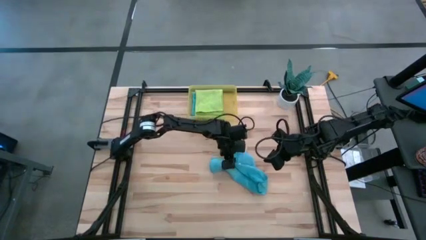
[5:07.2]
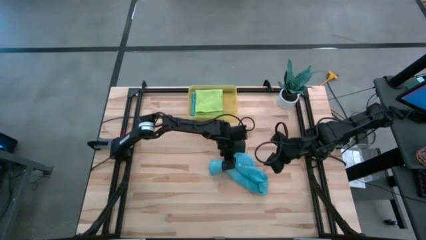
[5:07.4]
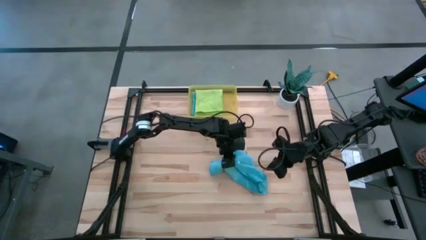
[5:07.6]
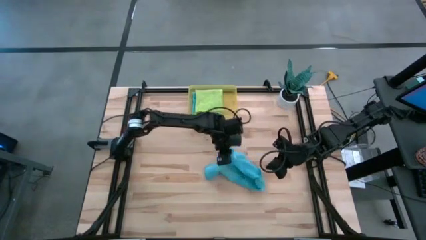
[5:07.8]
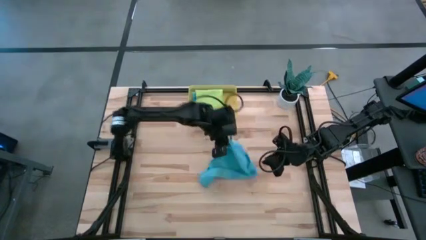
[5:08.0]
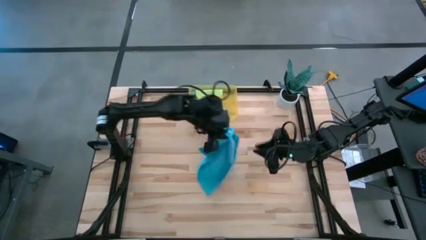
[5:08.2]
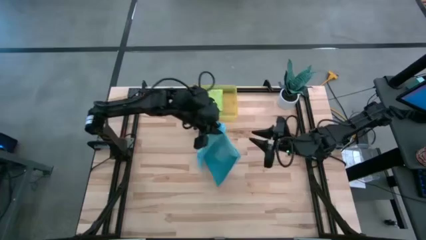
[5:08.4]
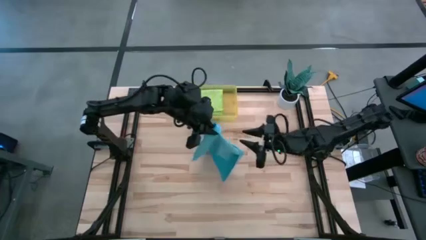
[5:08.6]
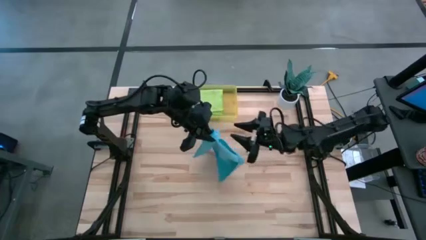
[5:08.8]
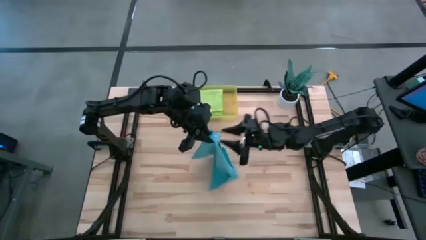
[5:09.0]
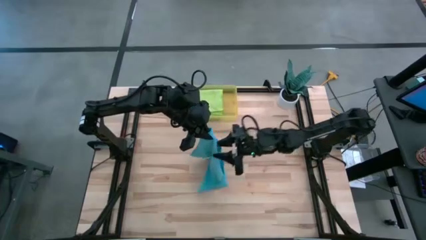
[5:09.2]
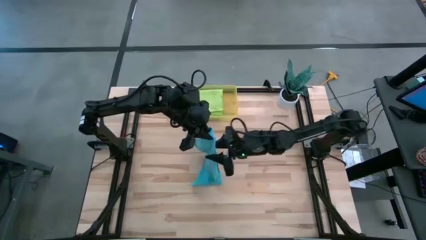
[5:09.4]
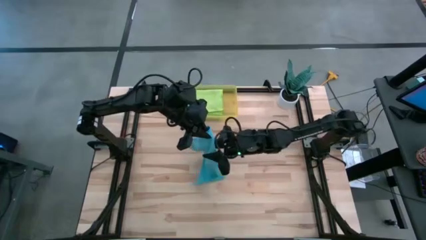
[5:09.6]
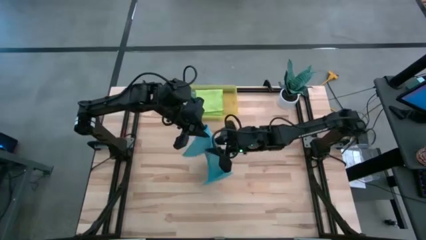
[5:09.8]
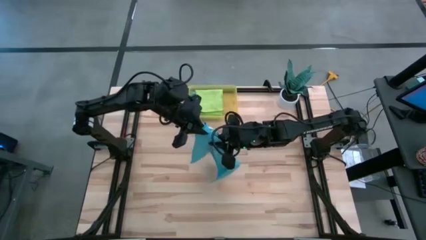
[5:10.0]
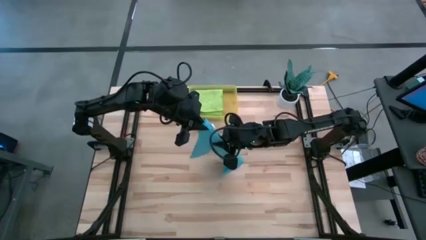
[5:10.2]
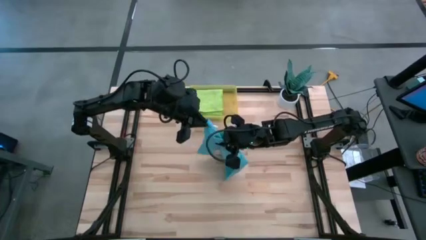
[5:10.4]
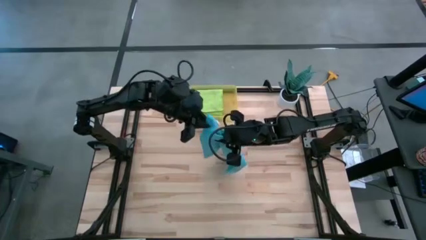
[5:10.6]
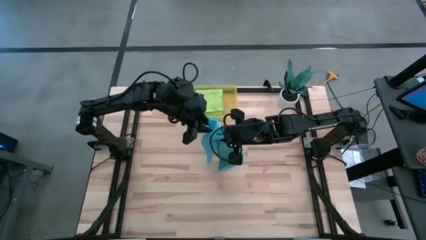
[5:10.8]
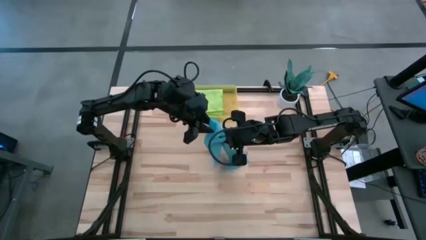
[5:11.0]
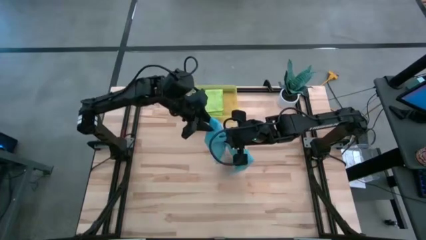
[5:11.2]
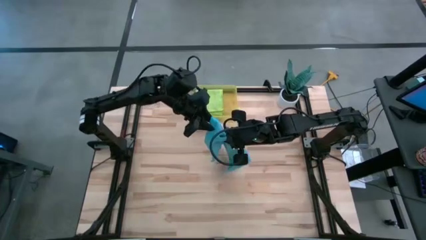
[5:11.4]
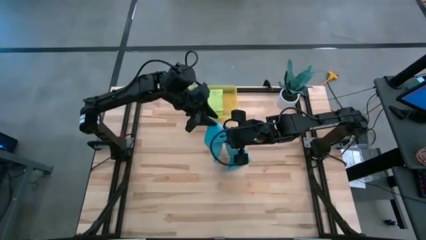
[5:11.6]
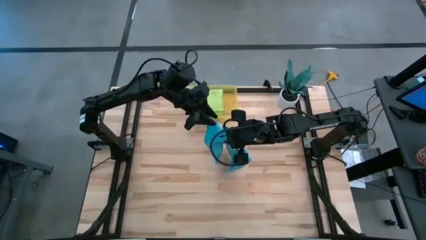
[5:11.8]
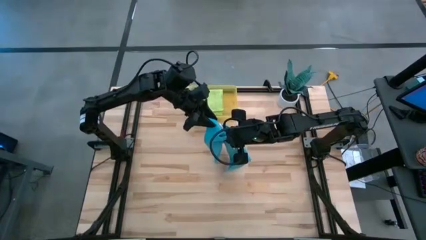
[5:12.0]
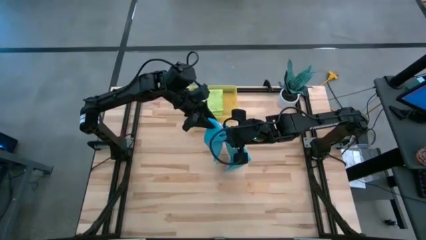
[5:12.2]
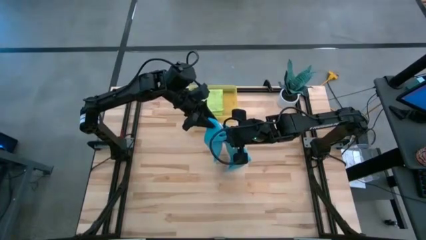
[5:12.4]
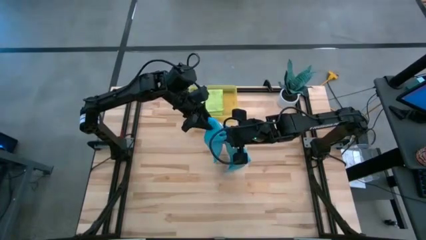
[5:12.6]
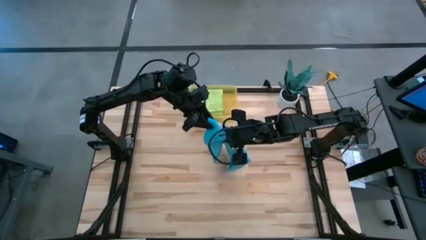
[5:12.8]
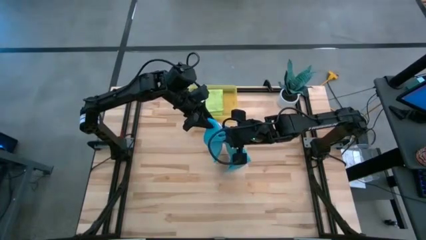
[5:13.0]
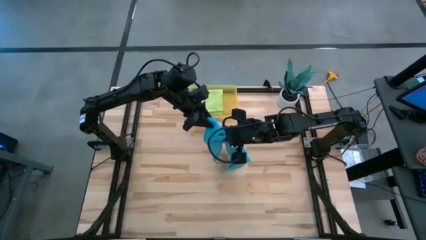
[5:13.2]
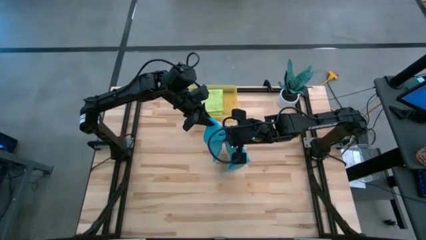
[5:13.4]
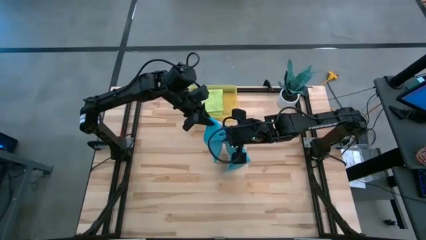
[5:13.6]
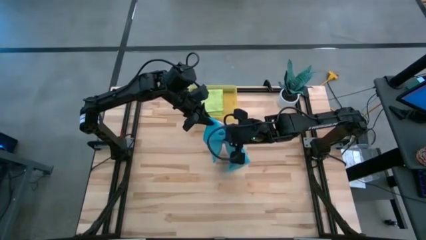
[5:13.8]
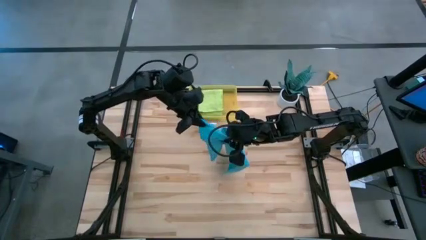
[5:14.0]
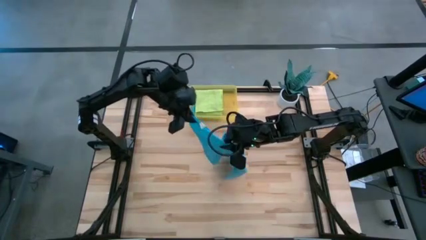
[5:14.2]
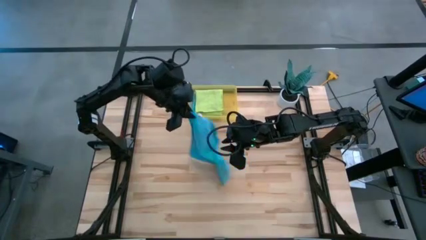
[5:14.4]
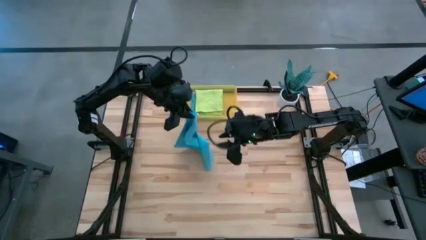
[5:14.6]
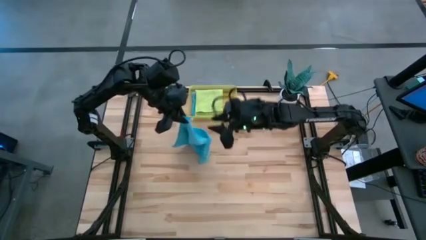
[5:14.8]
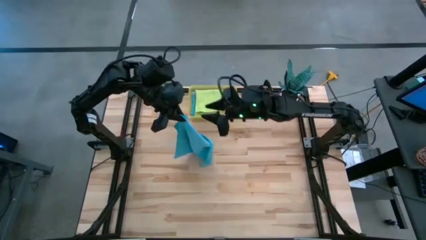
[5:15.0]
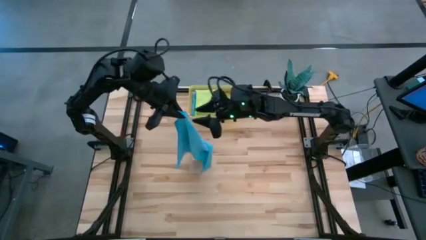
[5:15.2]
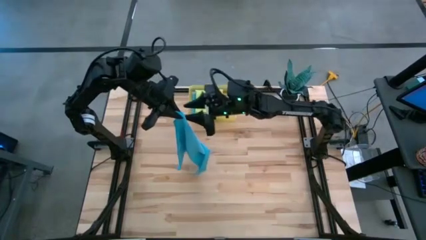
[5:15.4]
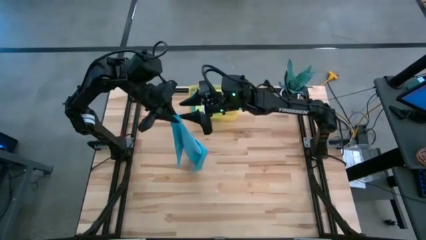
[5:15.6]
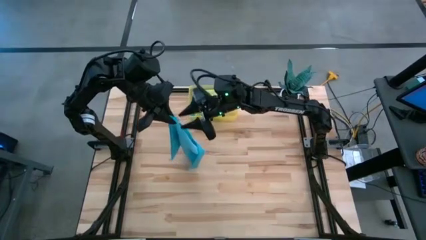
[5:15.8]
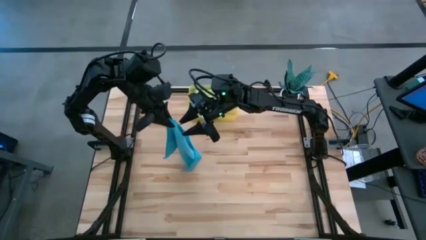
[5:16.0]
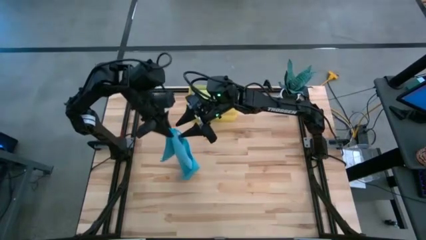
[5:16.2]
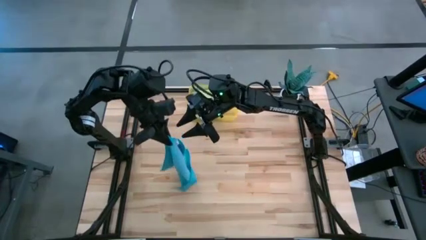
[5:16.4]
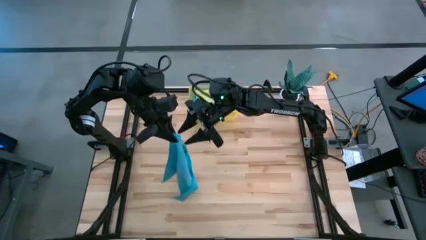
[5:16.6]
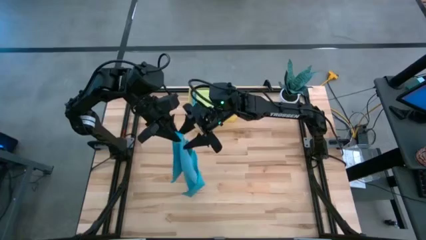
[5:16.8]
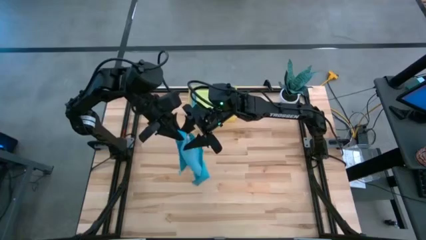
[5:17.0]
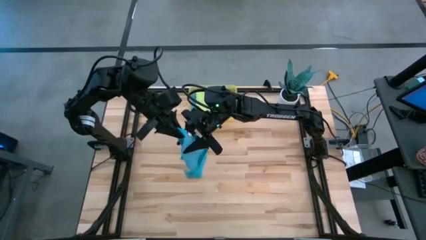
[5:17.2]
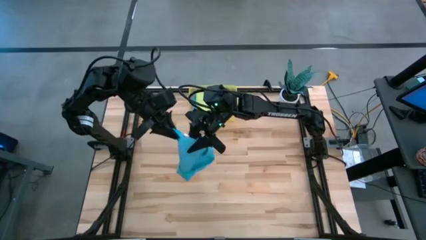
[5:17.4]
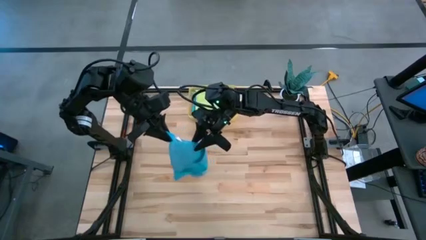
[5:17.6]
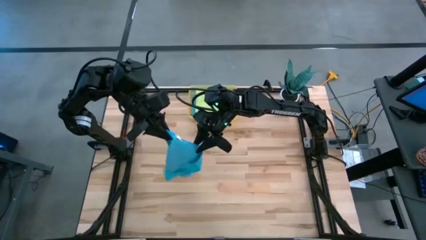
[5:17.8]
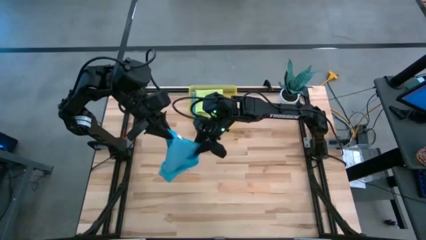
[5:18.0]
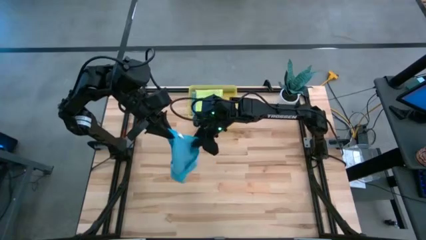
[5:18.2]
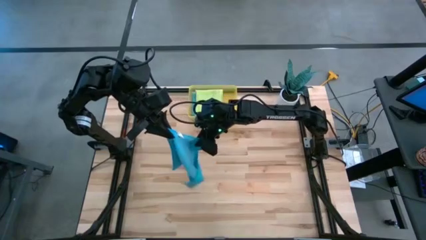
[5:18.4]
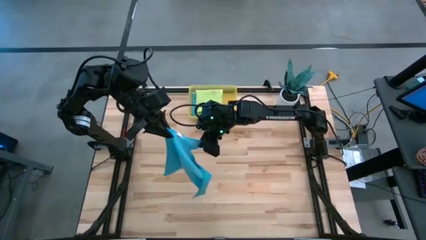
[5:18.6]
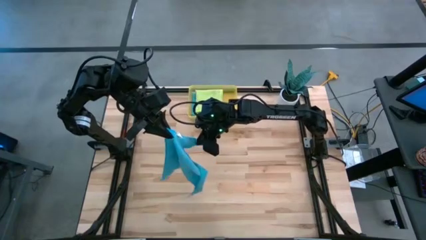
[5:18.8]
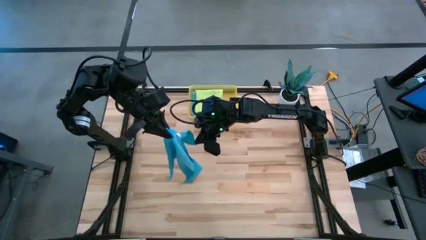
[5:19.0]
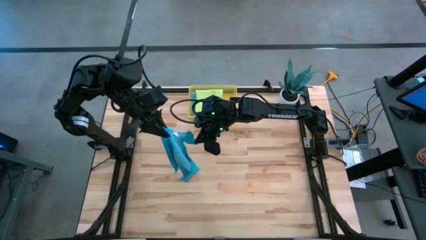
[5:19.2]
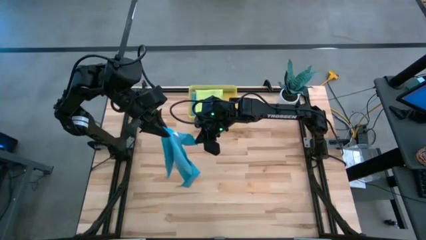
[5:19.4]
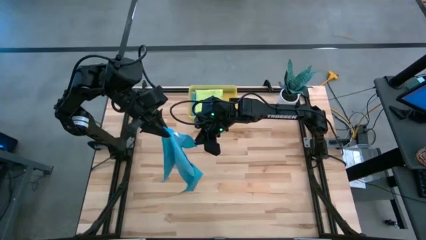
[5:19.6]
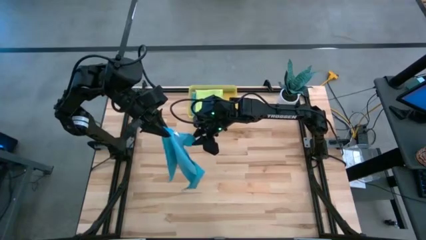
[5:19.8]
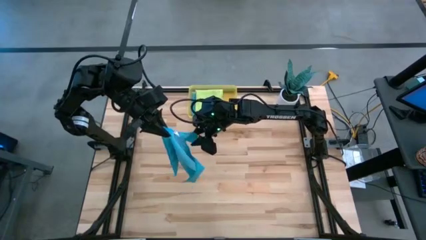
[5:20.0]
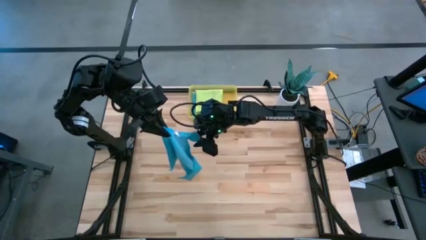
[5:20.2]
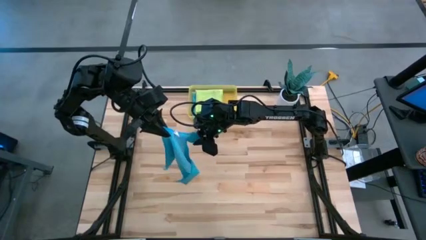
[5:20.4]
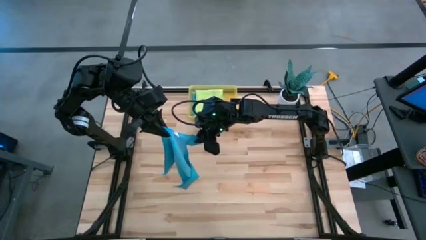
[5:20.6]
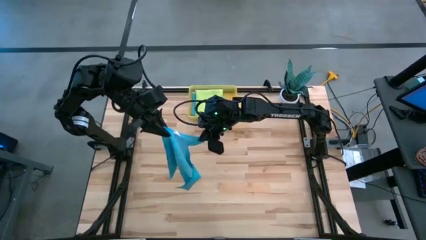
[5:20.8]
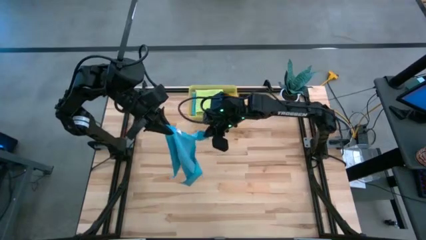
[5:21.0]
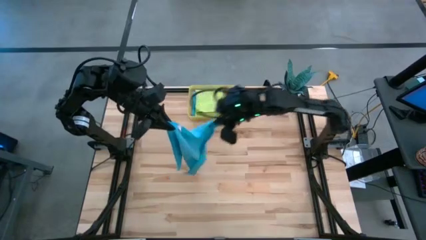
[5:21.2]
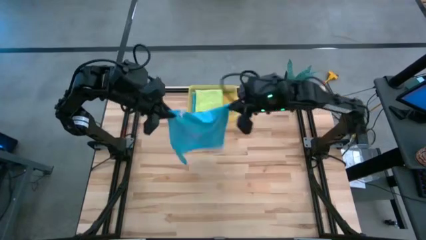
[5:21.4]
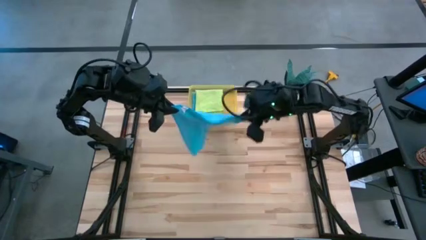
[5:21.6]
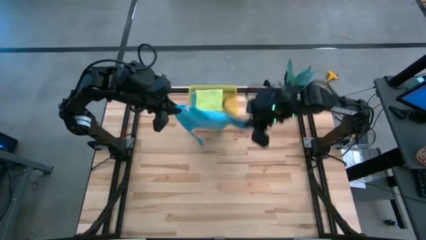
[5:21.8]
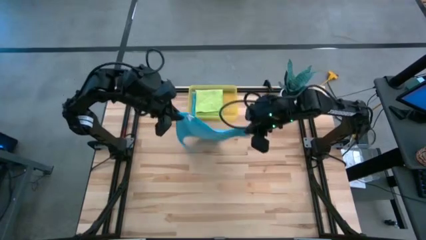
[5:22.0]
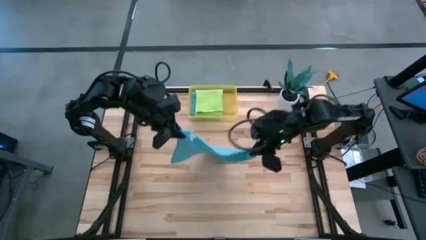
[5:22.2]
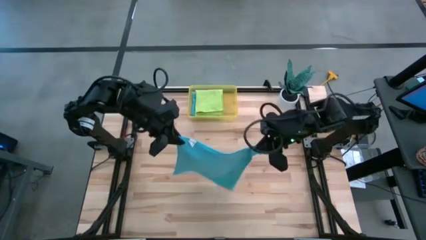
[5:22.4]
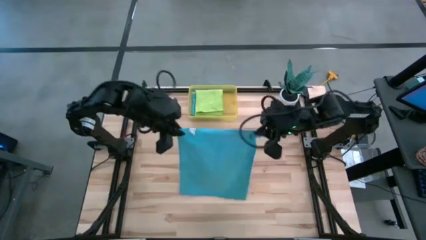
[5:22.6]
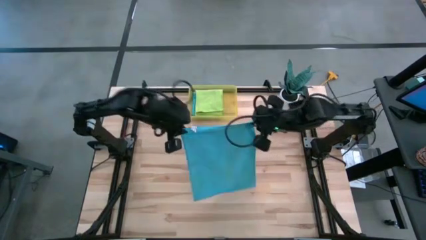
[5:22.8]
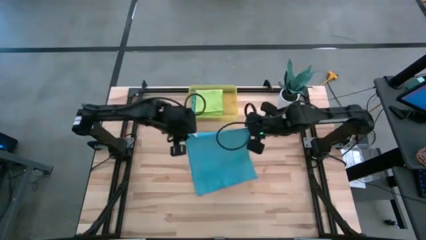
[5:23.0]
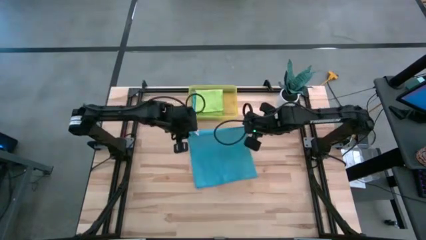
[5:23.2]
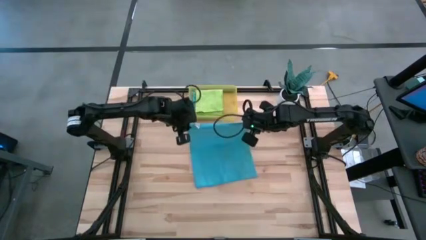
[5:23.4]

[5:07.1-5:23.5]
Task: Fold microfiber towels
Fold the blue microfiber cloth

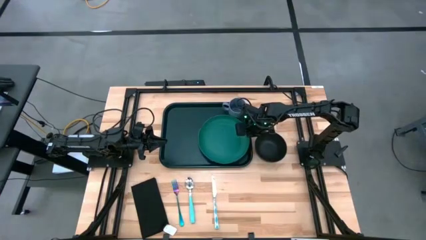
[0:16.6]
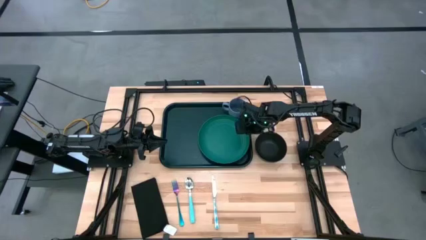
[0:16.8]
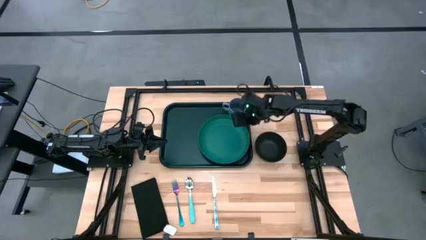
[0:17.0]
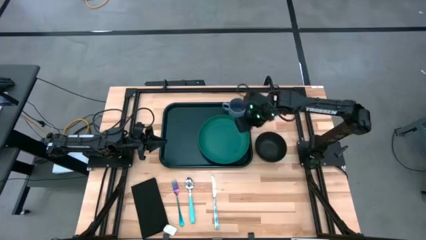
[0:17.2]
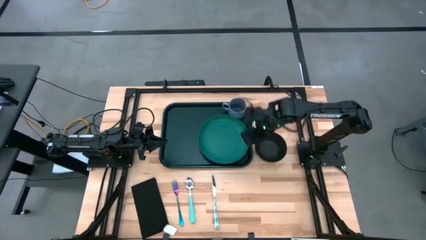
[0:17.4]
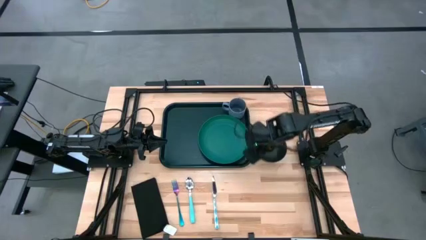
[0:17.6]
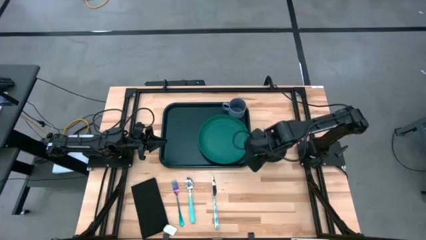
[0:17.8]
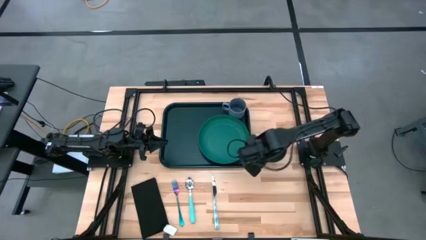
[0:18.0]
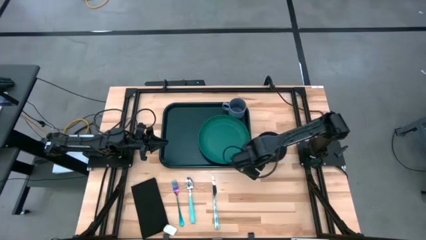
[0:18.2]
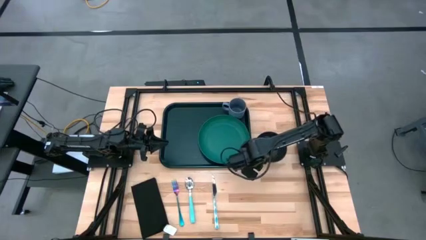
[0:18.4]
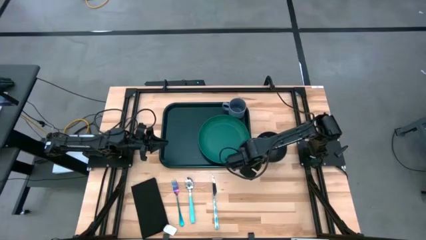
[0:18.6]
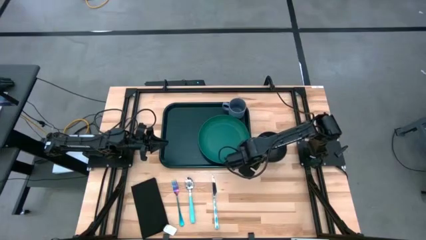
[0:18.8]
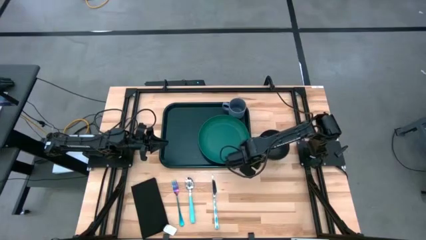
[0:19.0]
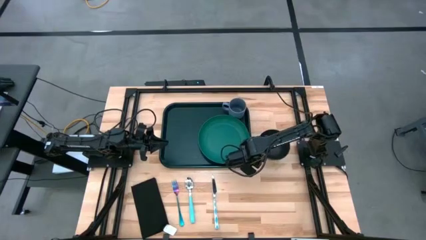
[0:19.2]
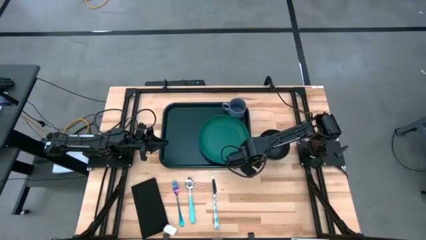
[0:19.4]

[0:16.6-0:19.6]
Task: Set up tray
Put the black bowl on top of the green plate on the black tray
